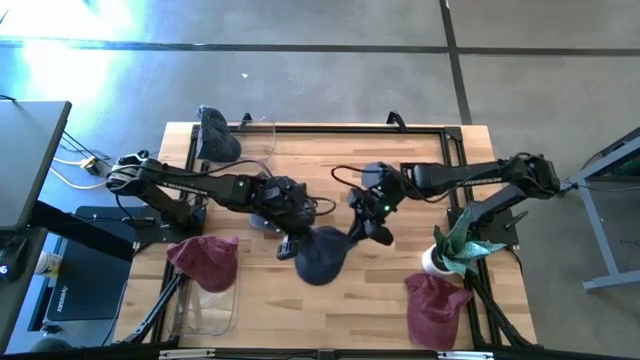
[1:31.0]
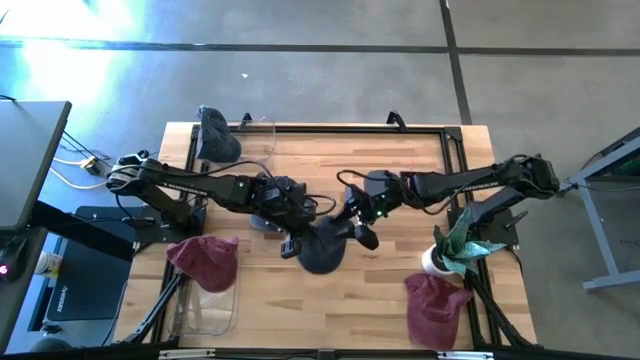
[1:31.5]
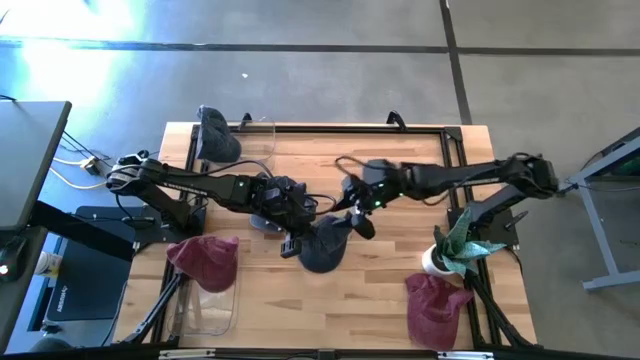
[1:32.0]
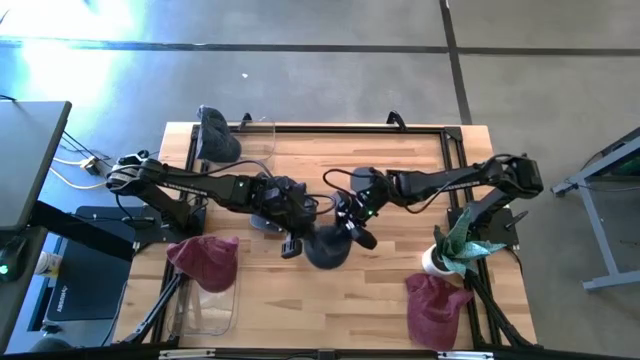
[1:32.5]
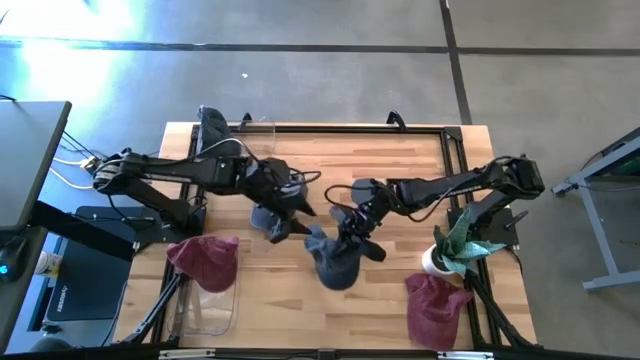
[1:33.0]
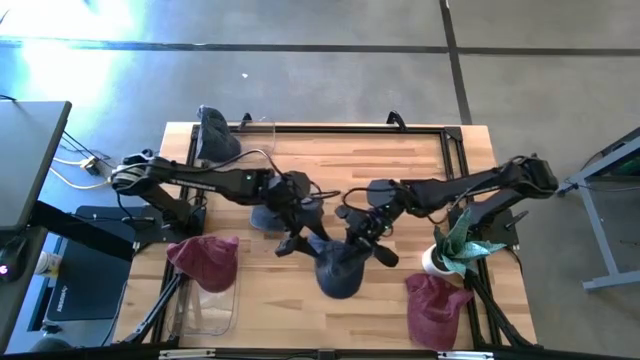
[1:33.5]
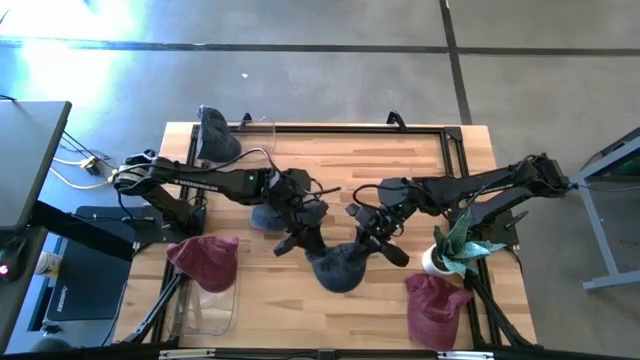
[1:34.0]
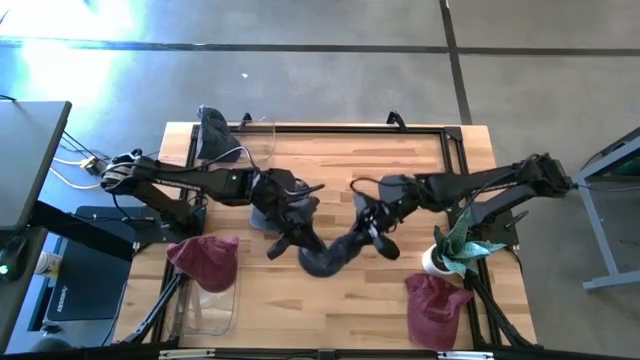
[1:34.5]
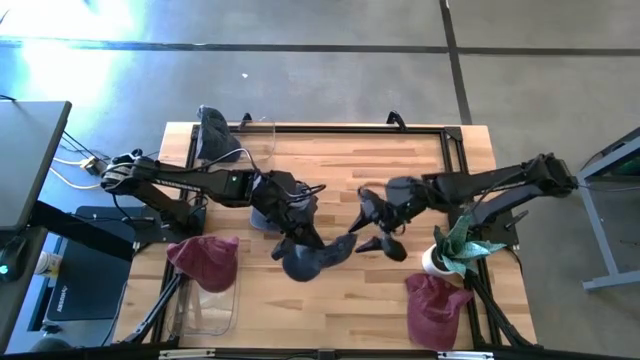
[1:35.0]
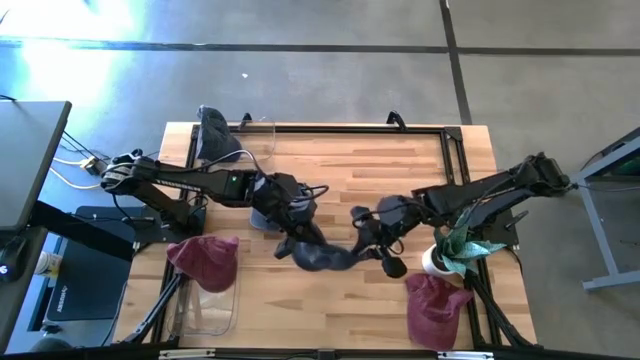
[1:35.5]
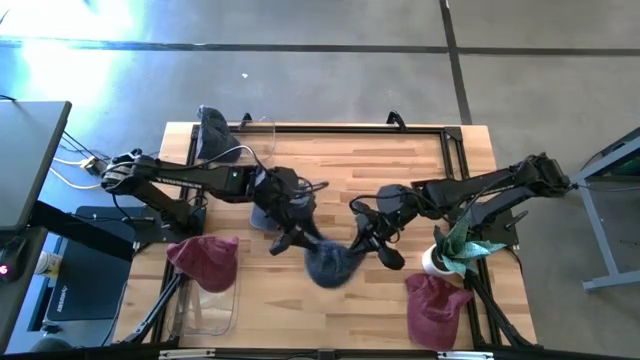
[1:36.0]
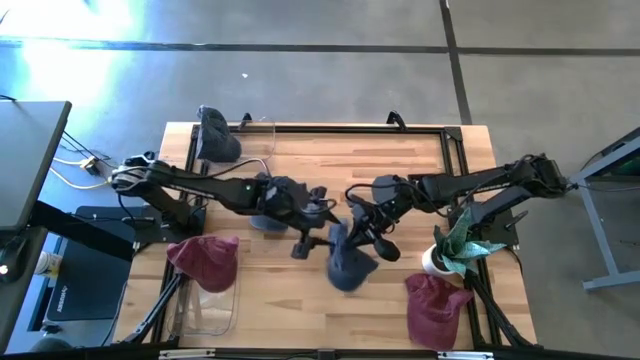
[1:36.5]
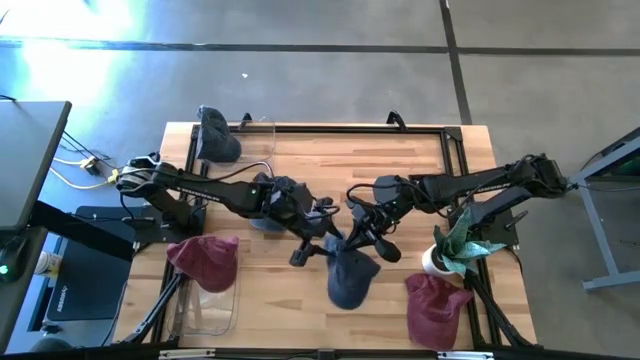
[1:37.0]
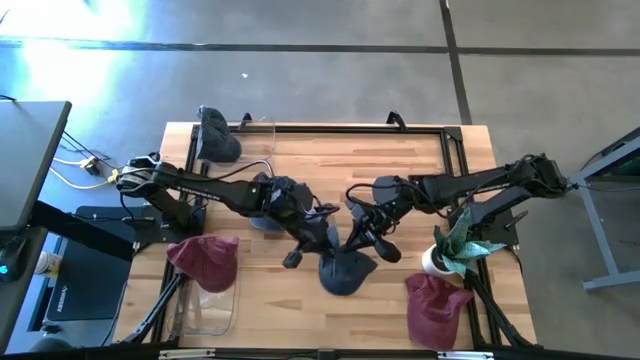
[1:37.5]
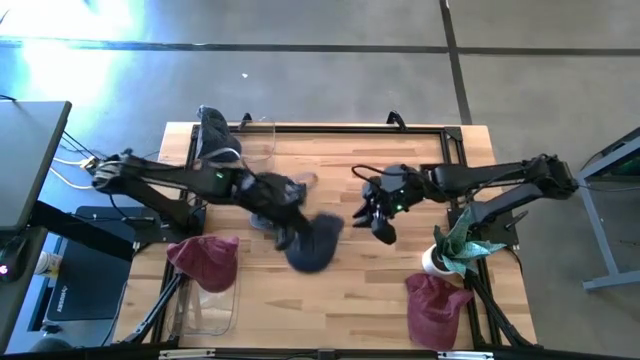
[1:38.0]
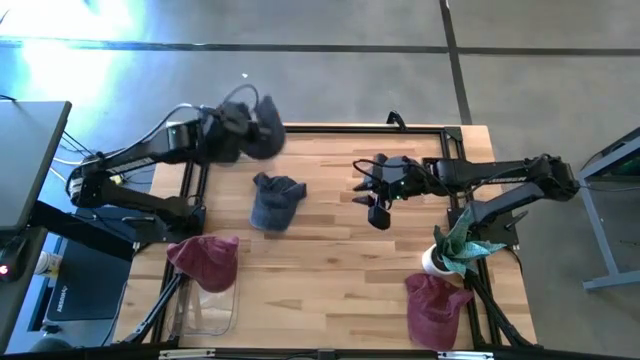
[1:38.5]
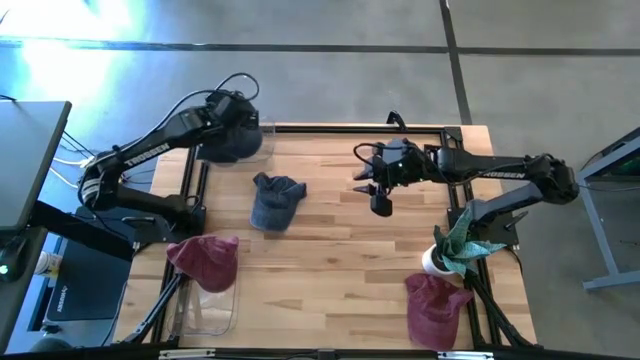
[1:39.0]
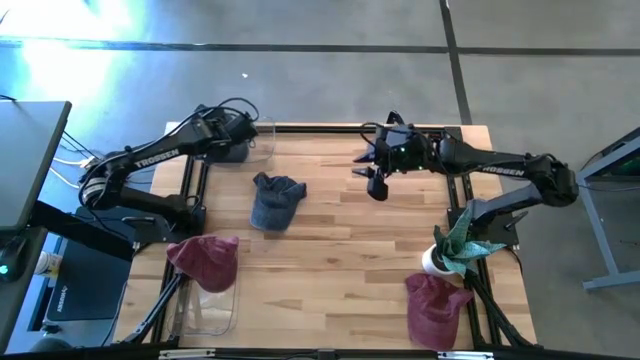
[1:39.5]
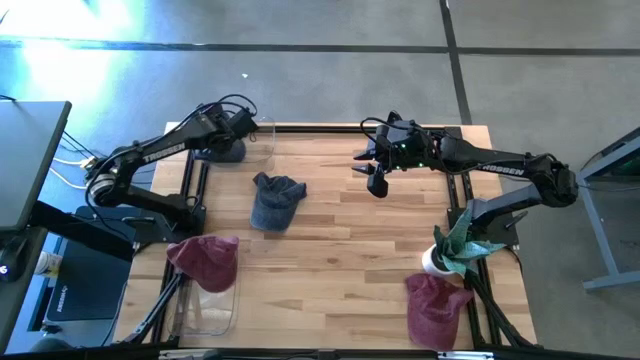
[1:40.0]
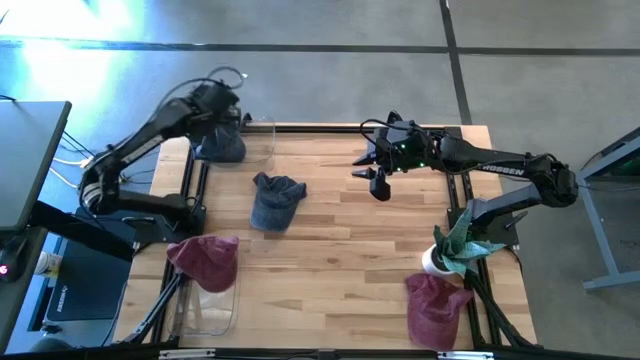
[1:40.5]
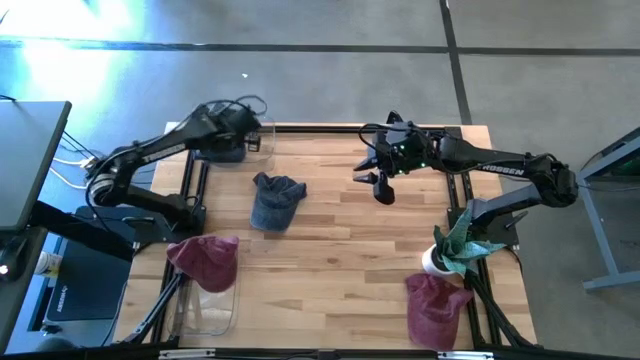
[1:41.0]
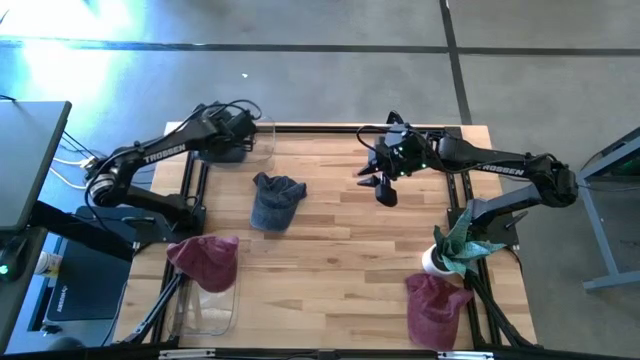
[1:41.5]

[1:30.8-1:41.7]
Task: Pick & Place hat
Put the right blue cap into the top transparent bin

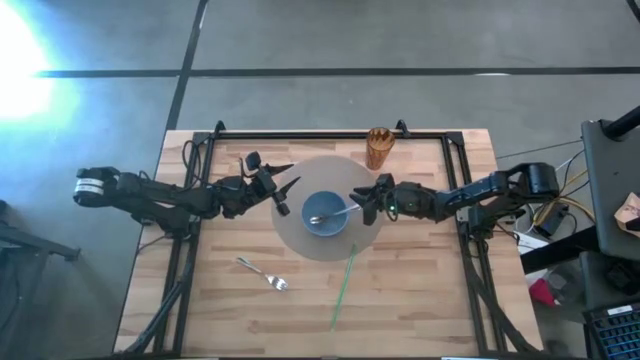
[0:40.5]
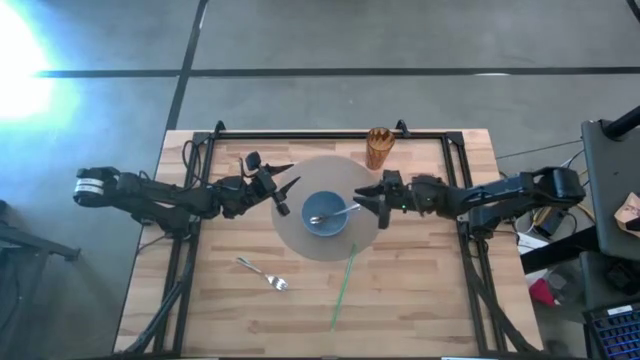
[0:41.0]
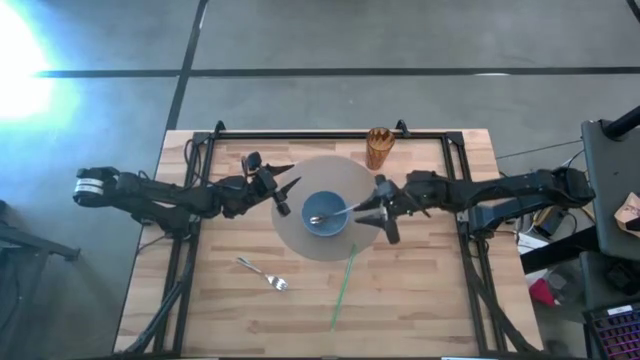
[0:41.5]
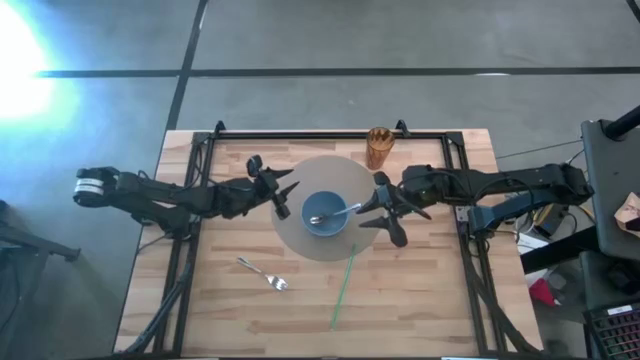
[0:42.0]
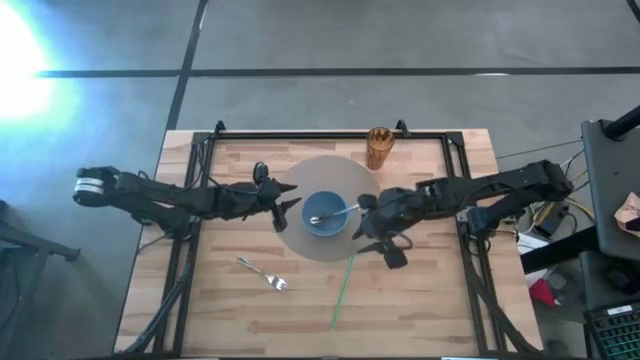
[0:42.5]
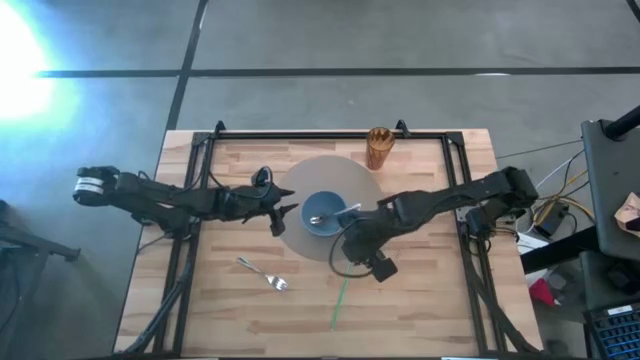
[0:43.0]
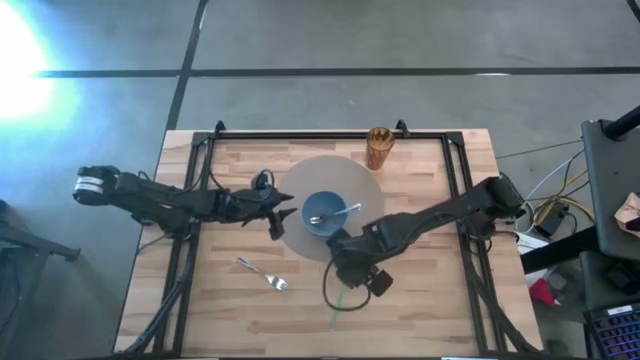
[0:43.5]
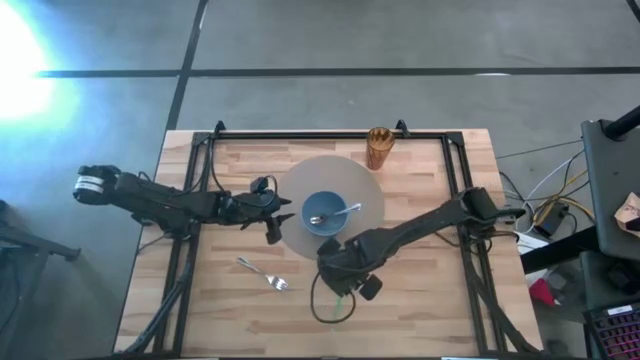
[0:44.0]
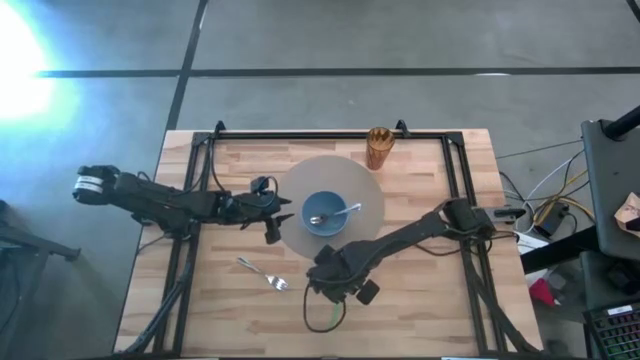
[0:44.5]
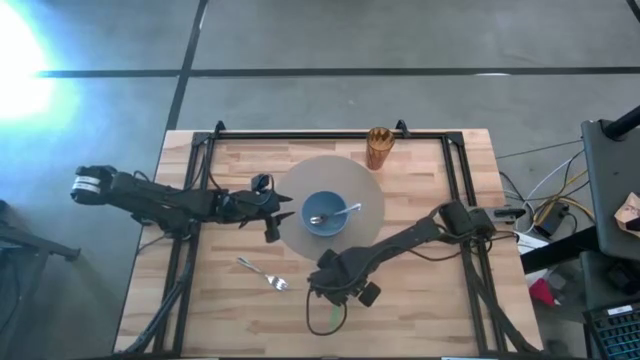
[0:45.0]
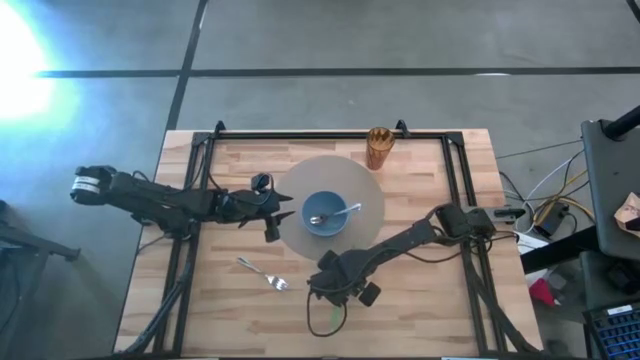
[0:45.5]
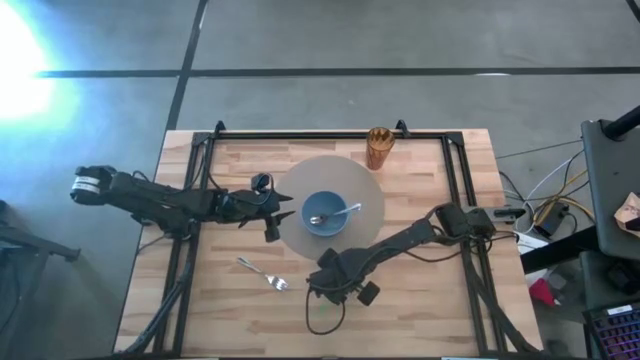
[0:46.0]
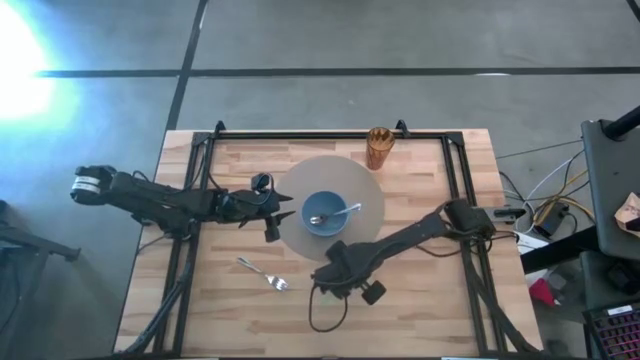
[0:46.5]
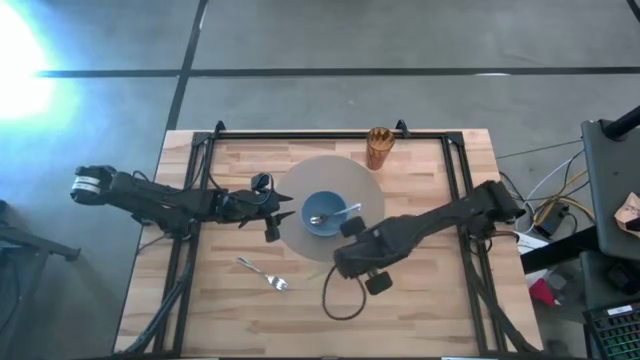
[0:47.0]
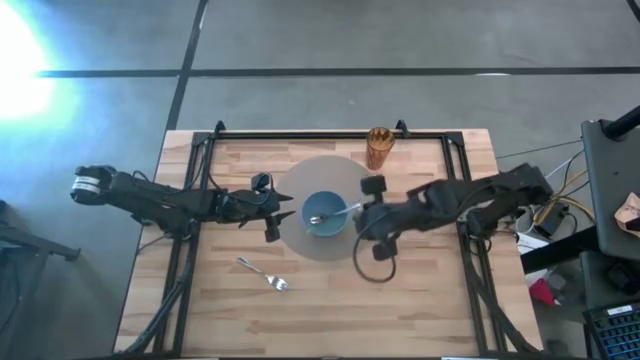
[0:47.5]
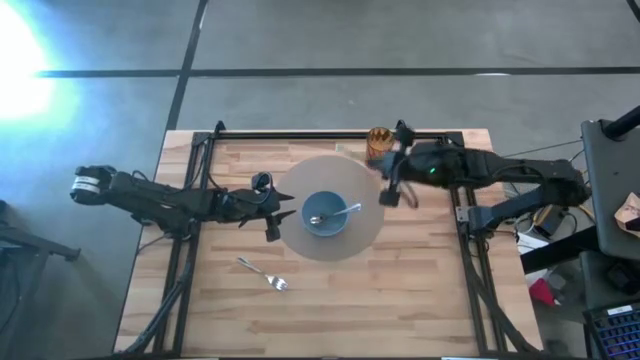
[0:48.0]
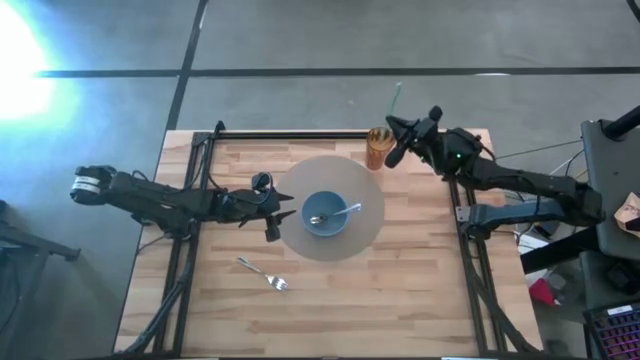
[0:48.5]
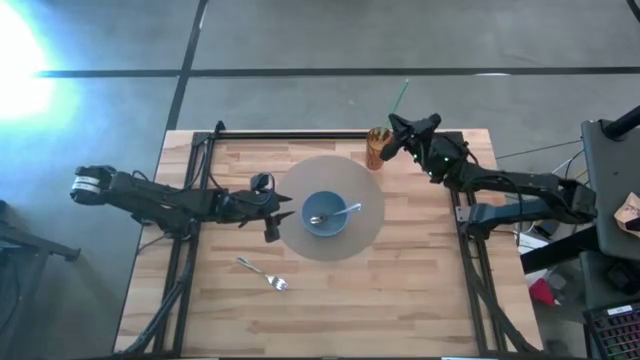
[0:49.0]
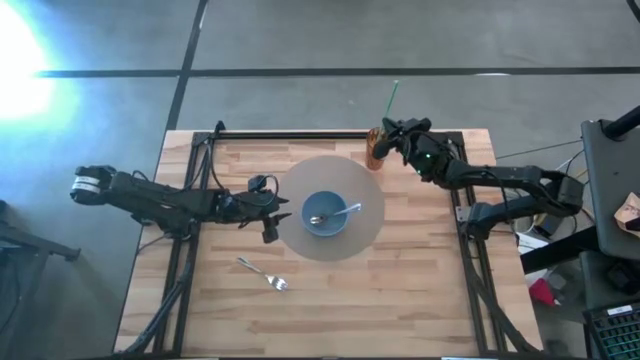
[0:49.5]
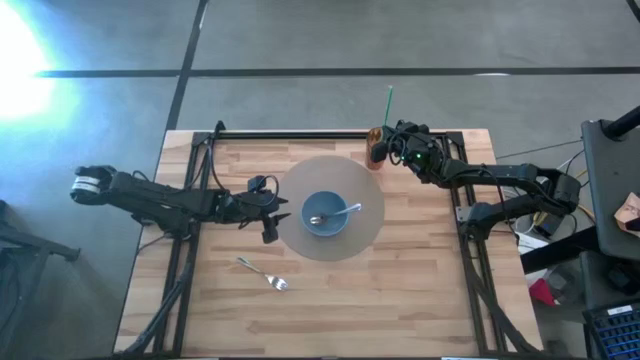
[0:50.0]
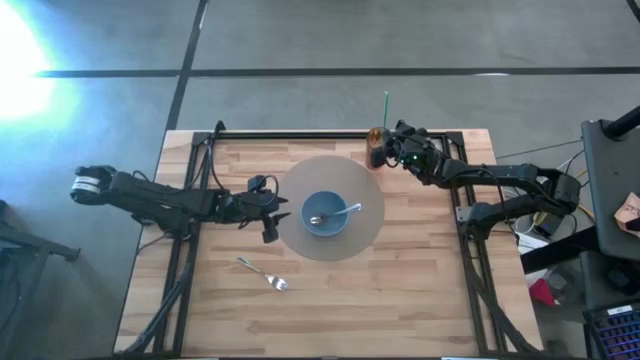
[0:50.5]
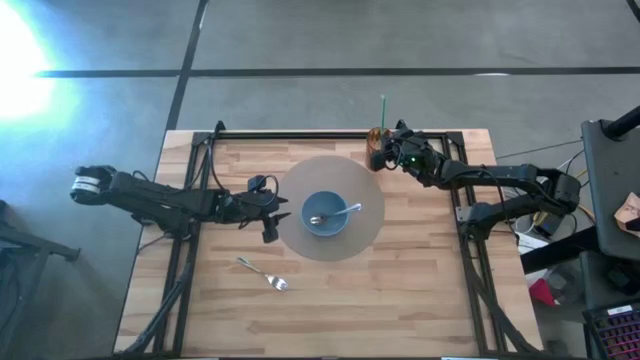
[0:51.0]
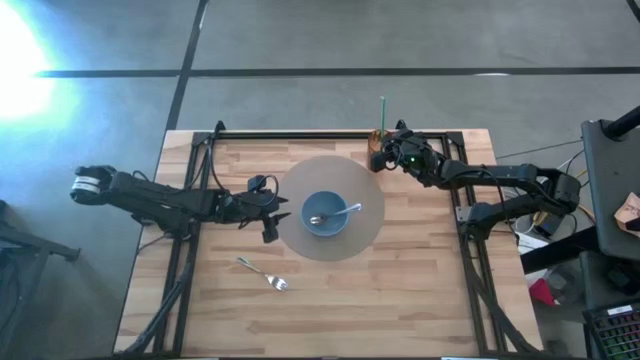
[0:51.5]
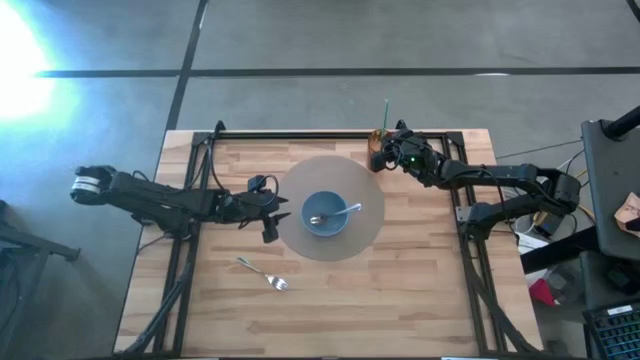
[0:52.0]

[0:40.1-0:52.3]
Task: Pick & Place Utensil
Put the straw into the cup
